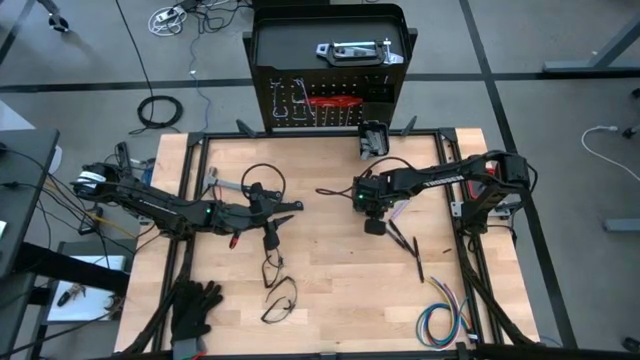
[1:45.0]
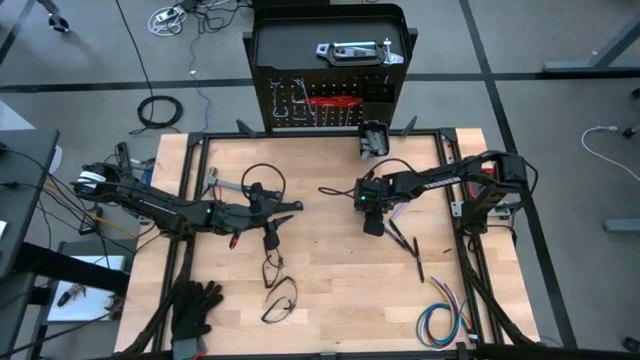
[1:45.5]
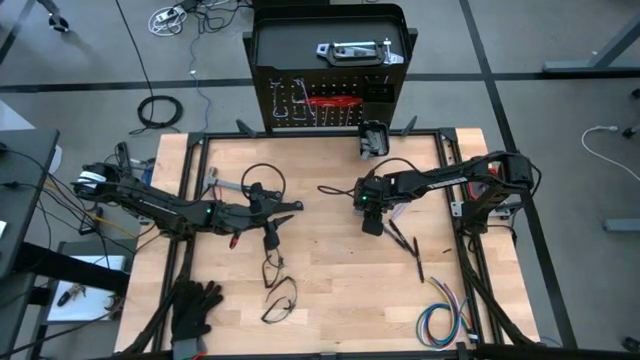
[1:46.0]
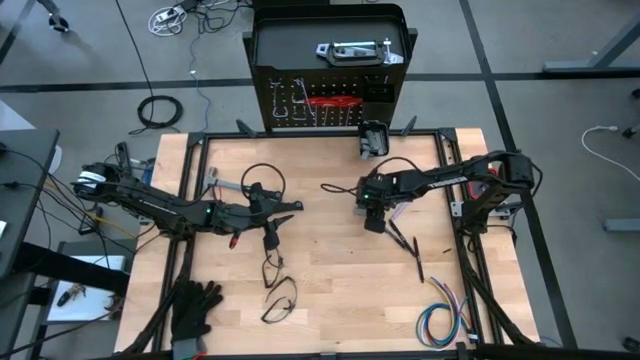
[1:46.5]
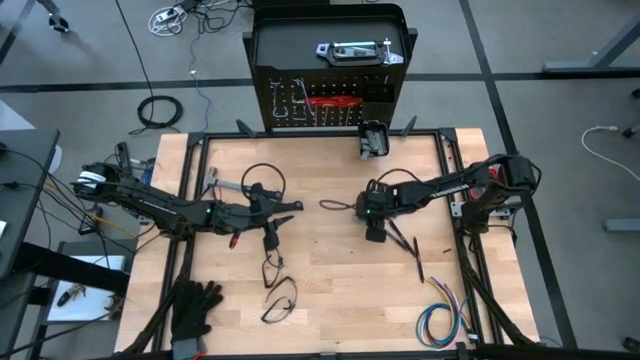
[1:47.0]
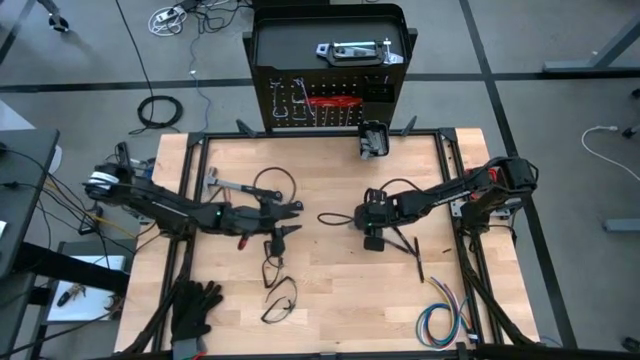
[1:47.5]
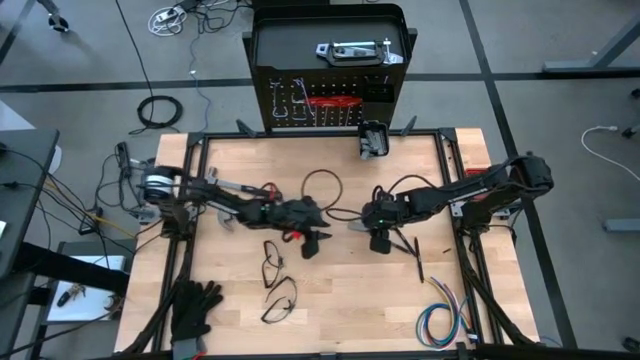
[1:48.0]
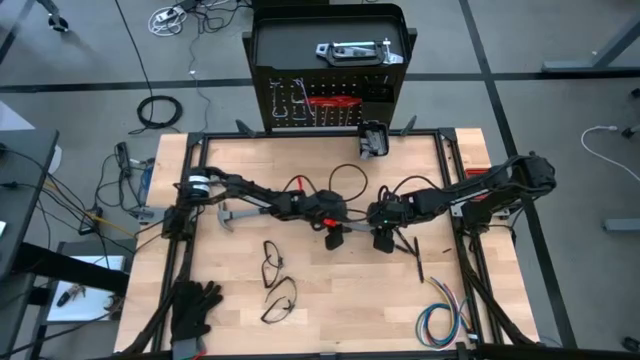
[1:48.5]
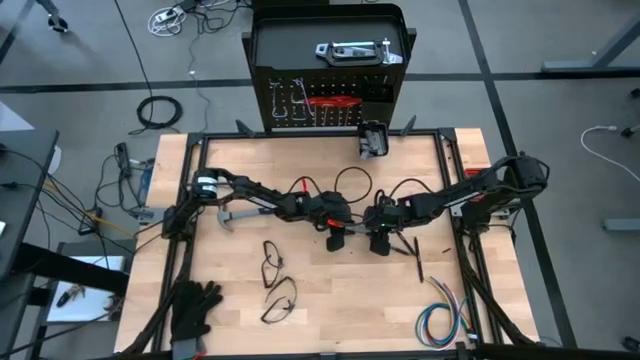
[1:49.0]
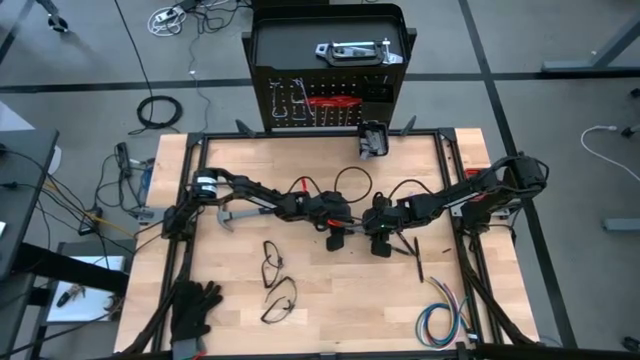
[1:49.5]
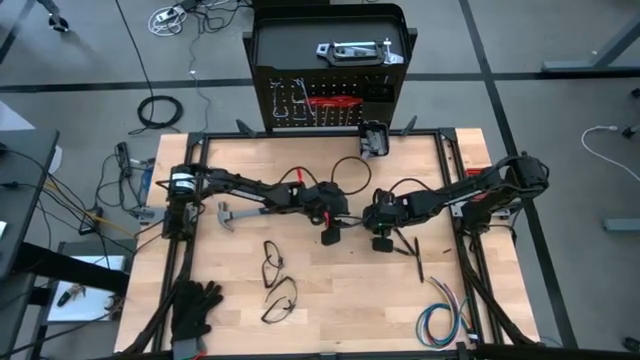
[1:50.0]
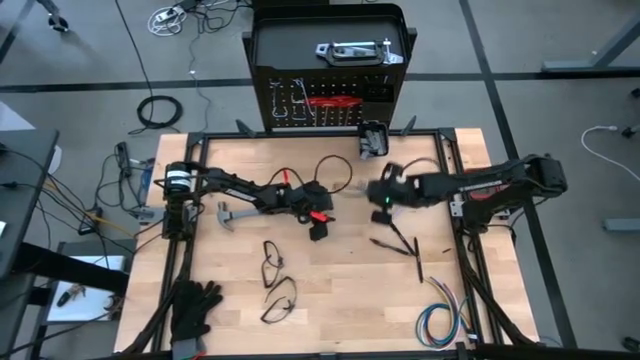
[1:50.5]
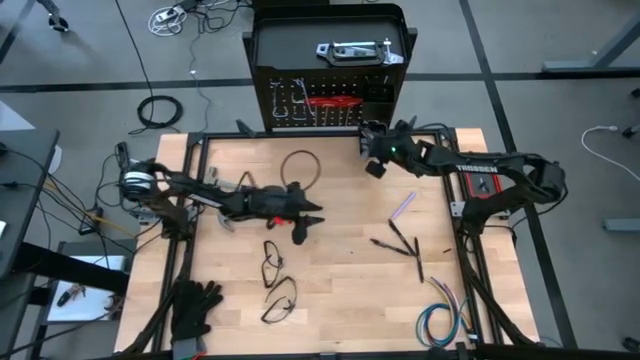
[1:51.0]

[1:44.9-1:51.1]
Task: Hang tools onto peg board
Put the screwdriver bits on the pegboard

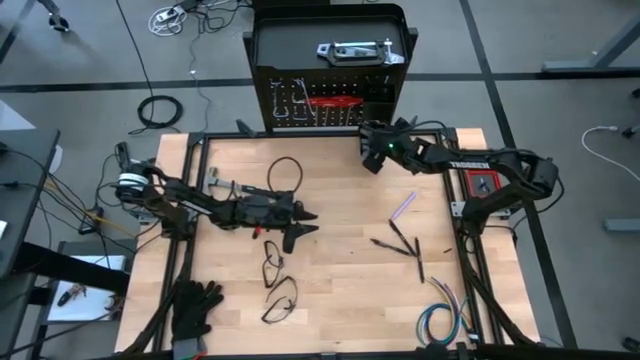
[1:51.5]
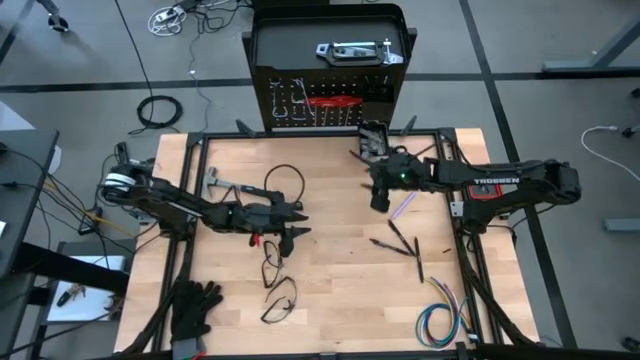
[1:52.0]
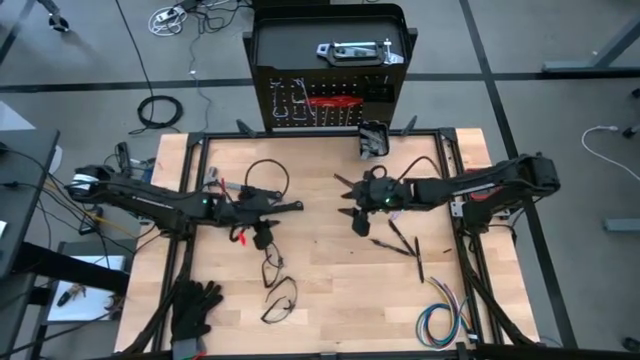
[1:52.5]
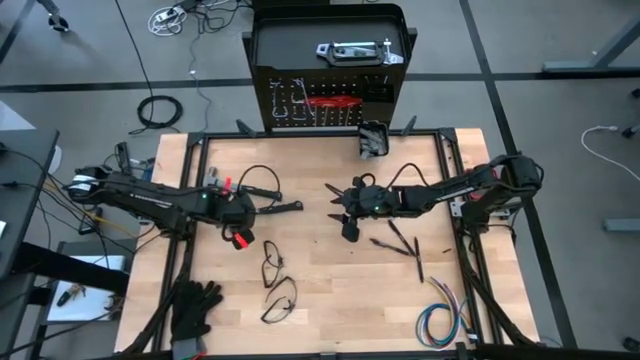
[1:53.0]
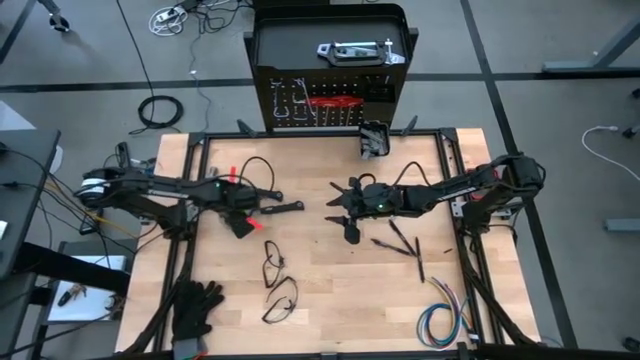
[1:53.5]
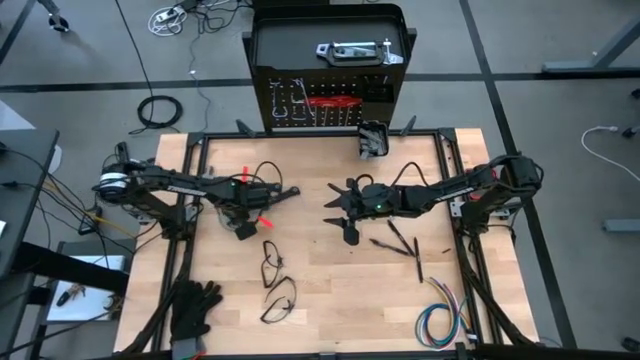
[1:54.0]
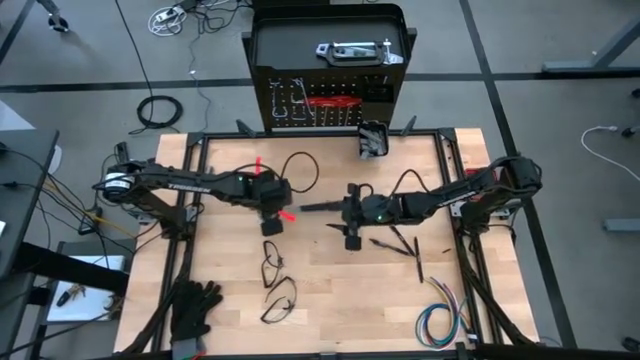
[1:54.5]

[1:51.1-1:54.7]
Move the middle left hammer on the middle right

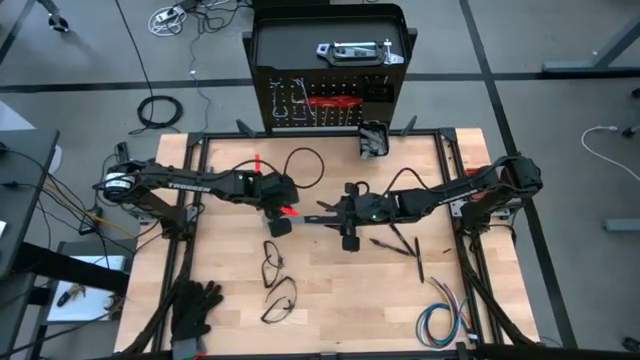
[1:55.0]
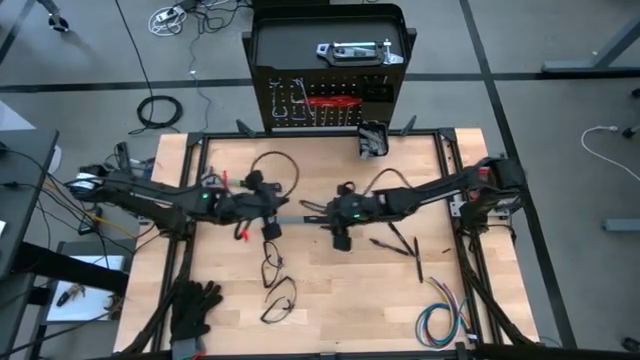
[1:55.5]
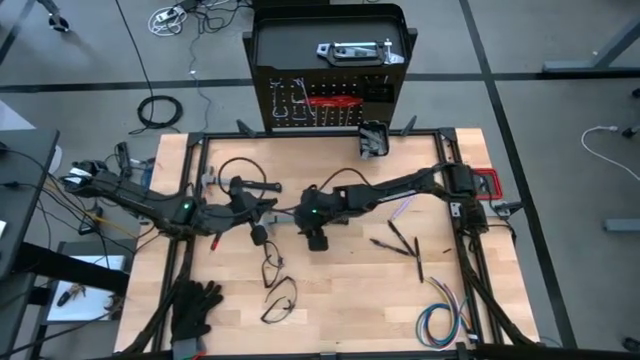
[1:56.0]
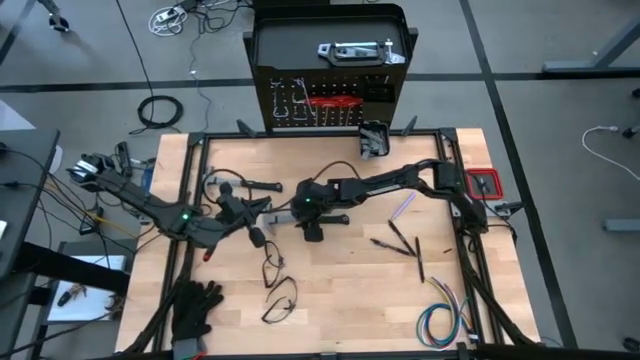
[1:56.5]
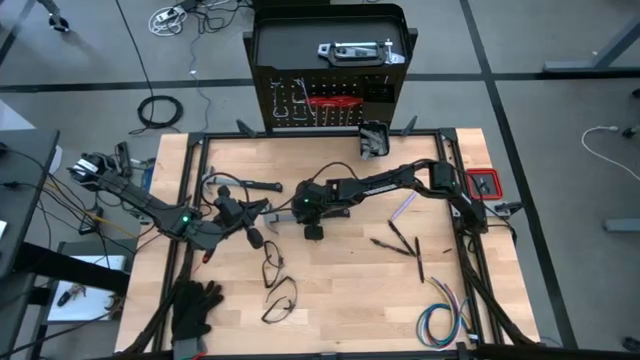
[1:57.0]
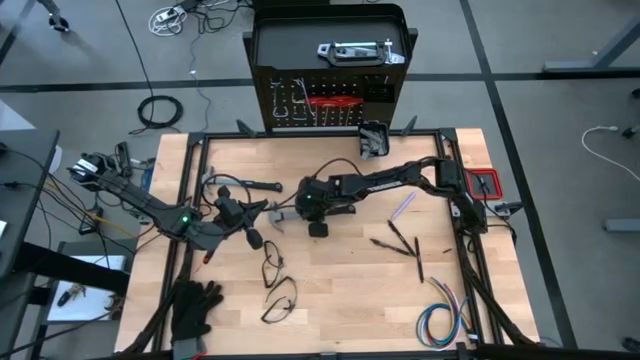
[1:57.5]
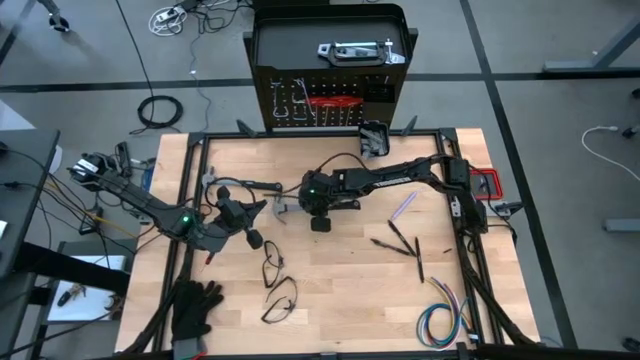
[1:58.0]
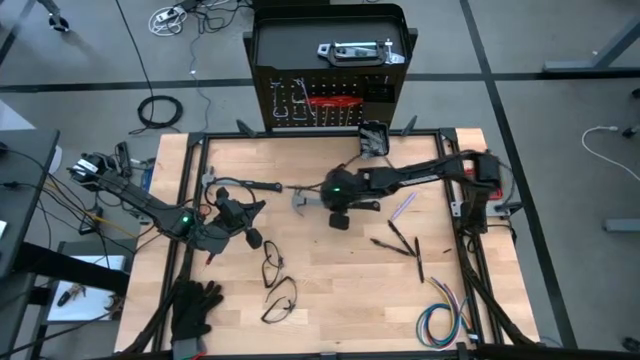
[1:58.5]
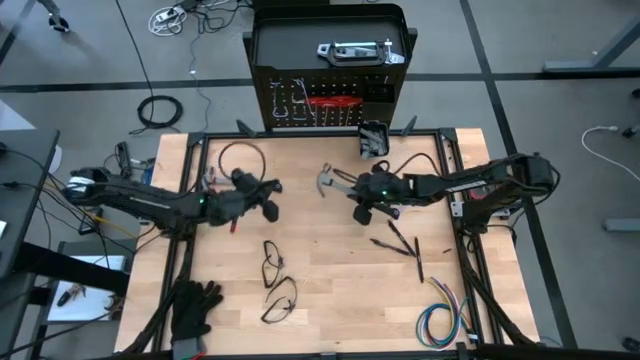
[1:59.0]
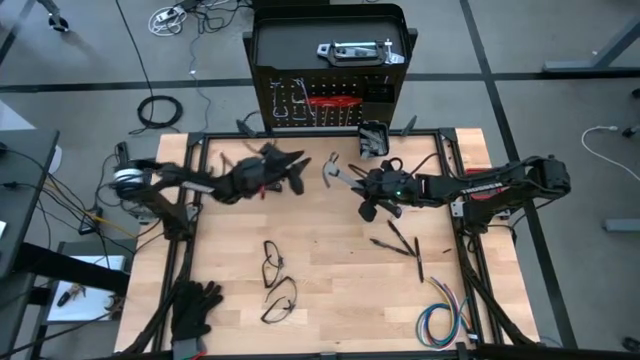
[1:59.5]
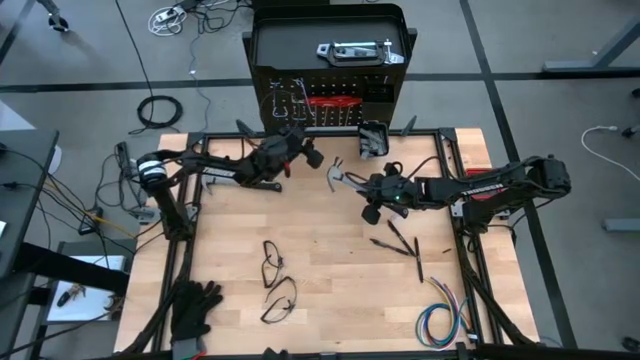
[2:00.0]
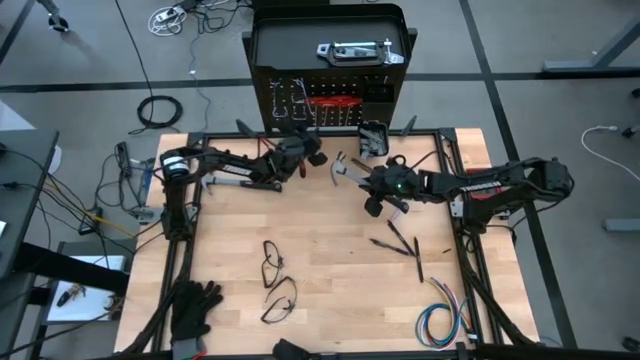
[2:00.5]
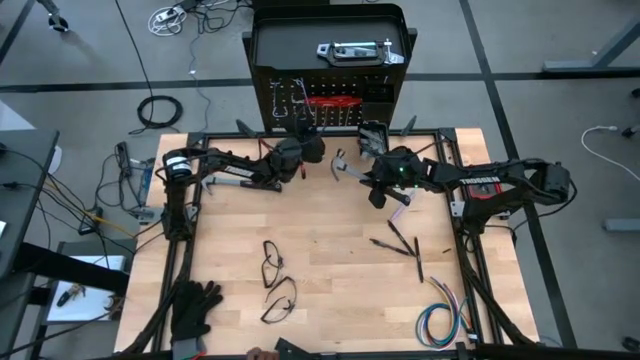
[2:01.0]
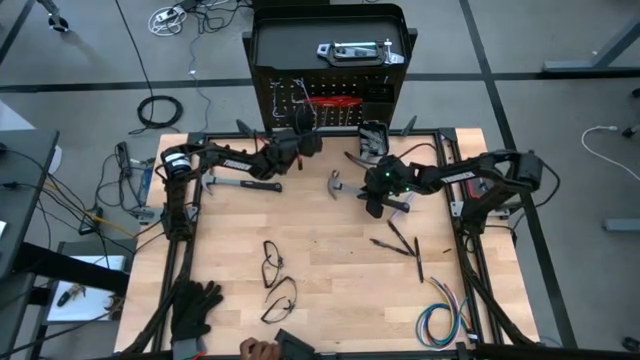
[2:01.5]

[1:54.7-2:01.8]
Move the middle left hammer on the middle right

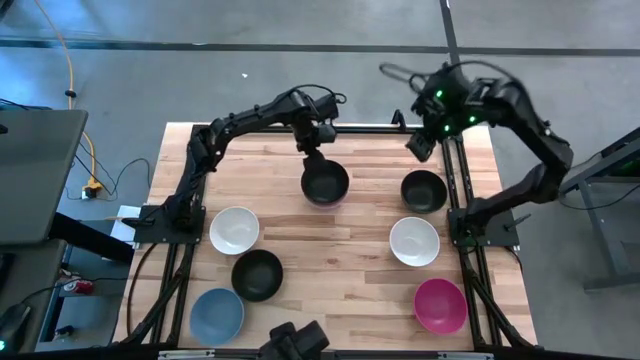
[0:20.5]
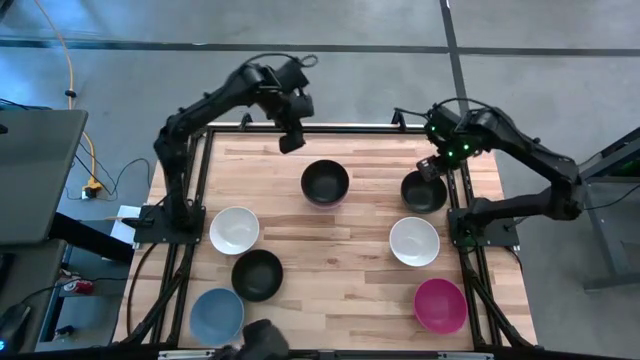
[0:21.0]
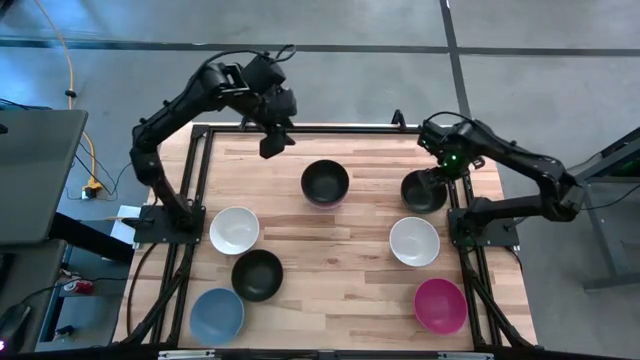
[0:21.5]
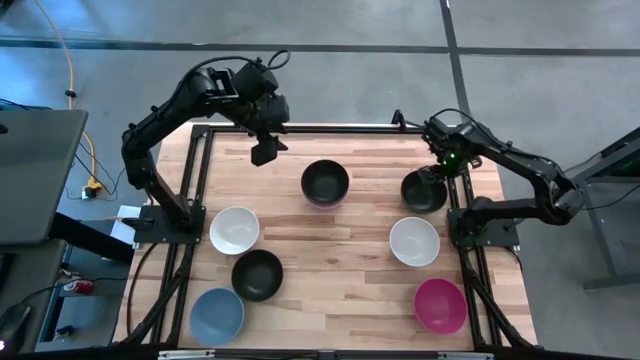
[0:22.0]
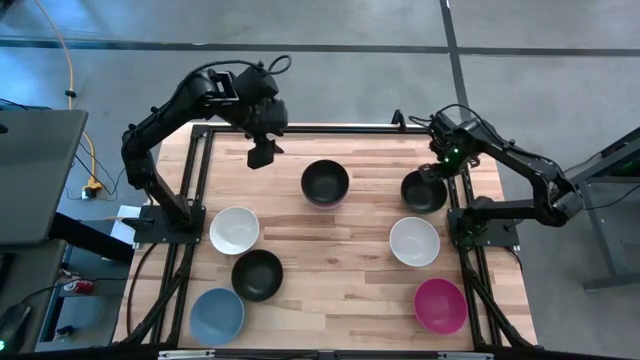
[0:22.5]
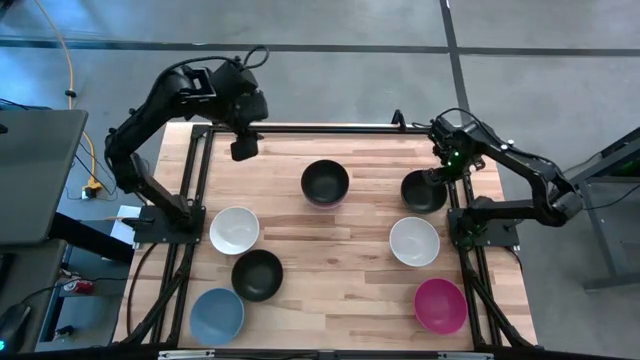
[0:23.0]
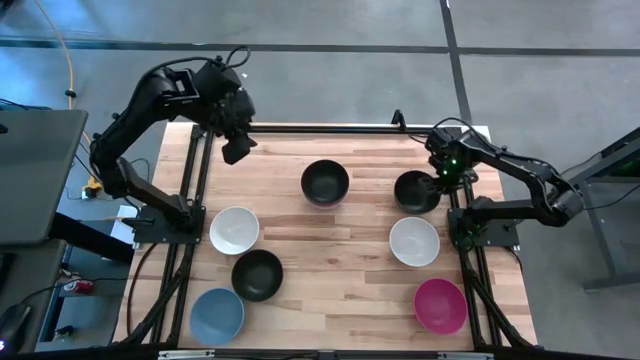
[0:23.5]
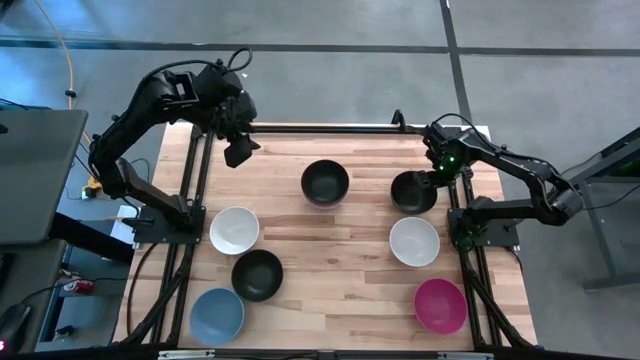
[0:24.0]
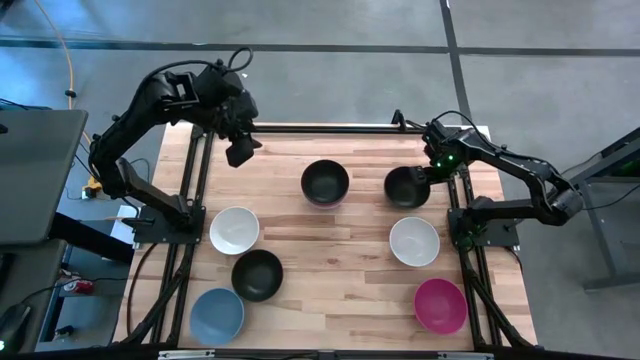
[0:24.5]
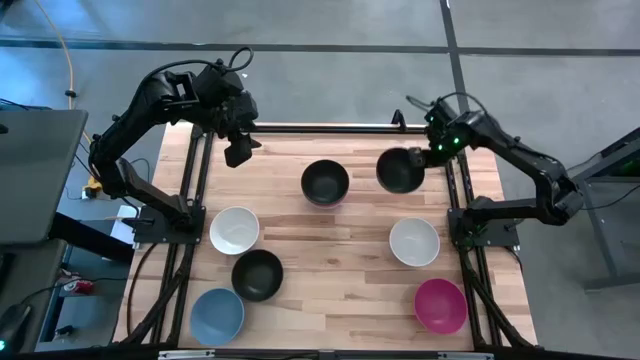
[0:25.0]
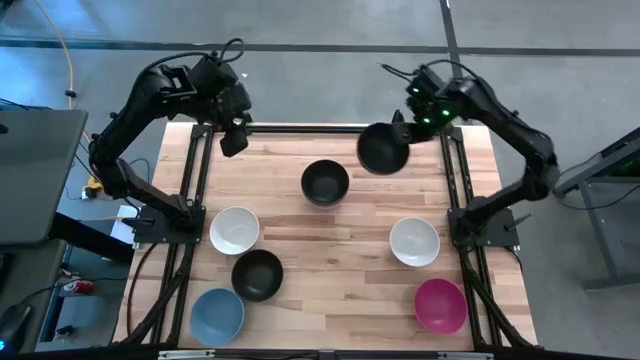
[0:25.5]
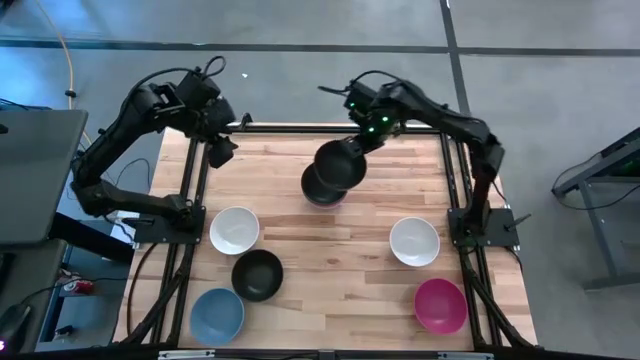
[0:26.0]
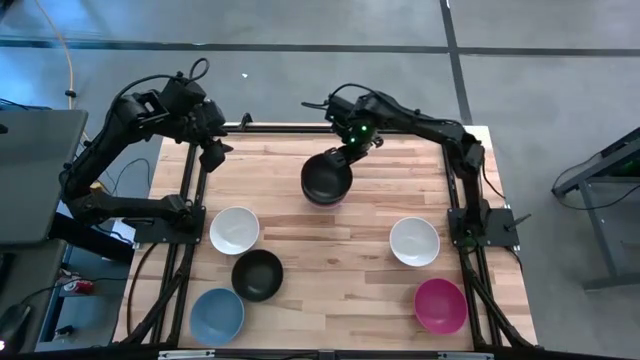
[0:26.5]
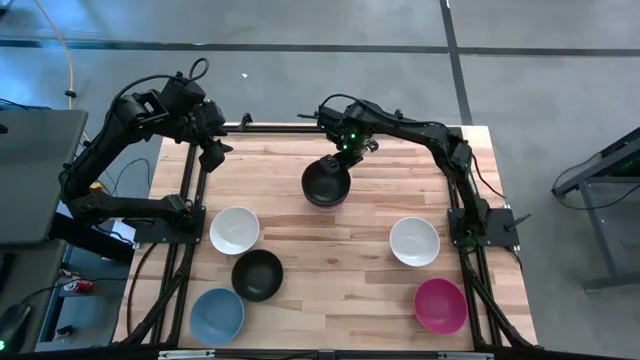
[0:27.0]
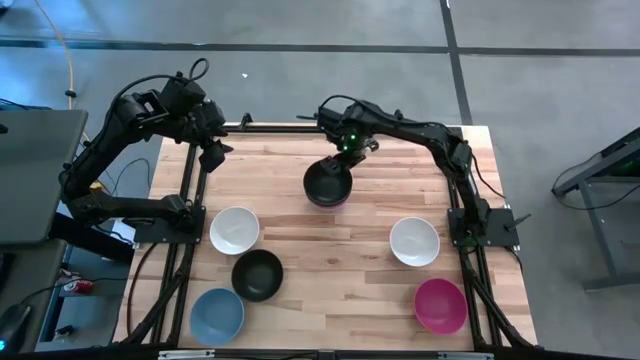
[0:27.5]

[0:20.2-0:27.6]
Task: Nest bowls inside each other
Stack the top black bowl on top of the black bowl
